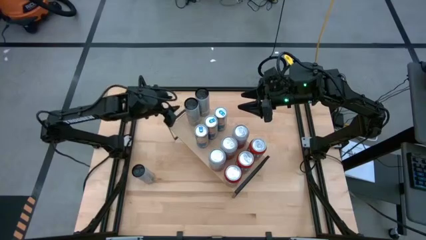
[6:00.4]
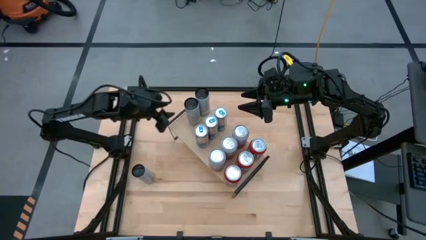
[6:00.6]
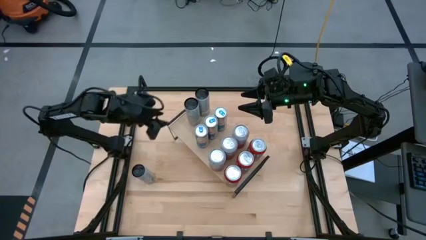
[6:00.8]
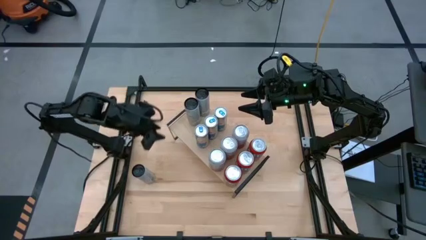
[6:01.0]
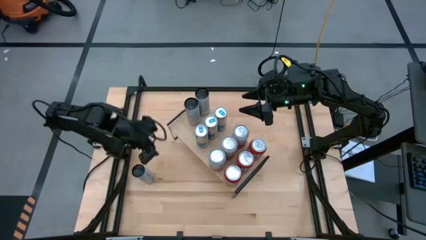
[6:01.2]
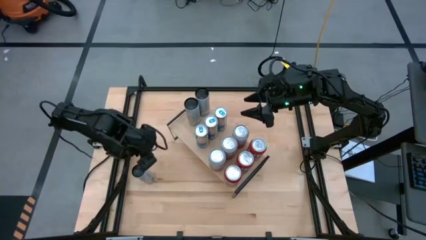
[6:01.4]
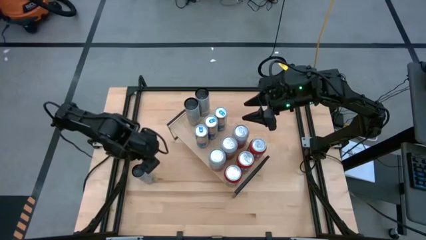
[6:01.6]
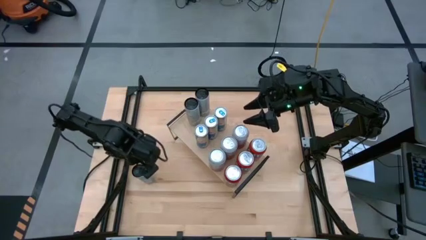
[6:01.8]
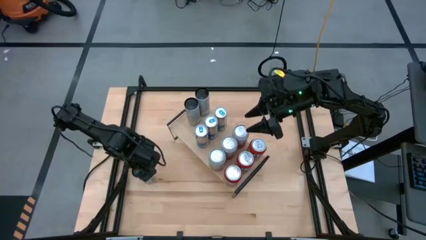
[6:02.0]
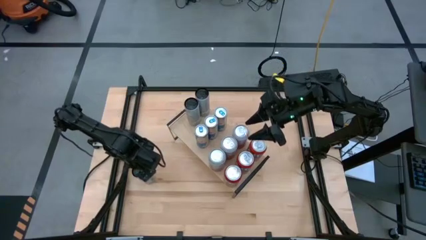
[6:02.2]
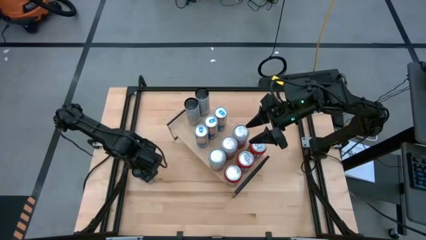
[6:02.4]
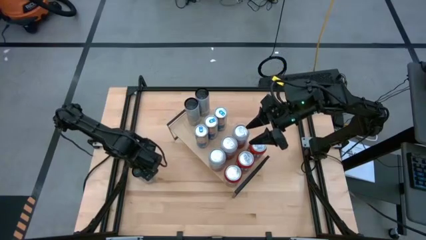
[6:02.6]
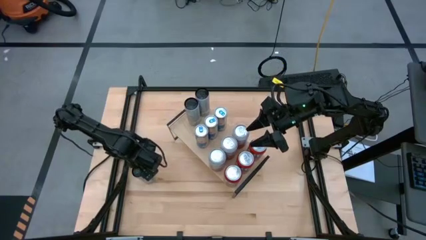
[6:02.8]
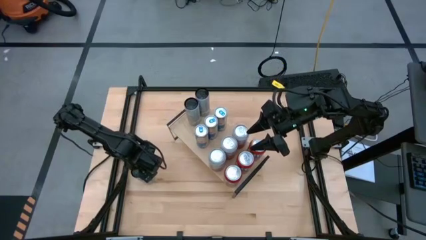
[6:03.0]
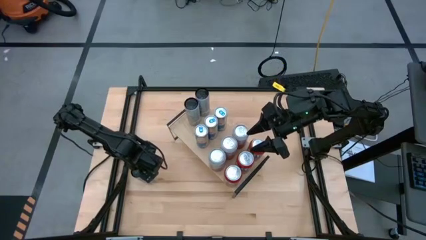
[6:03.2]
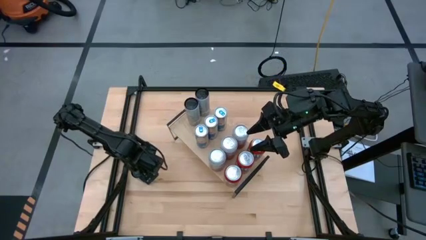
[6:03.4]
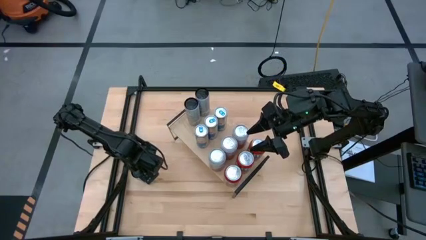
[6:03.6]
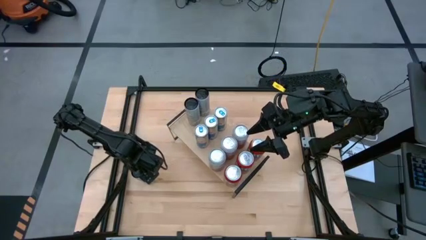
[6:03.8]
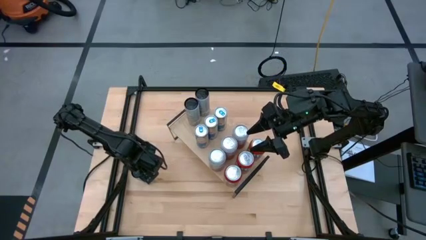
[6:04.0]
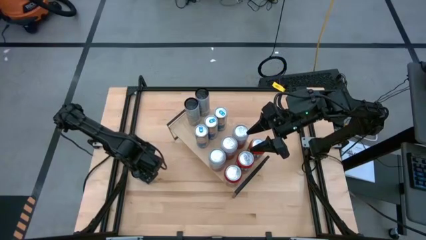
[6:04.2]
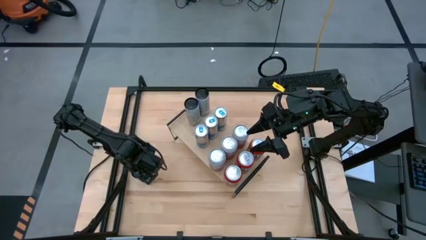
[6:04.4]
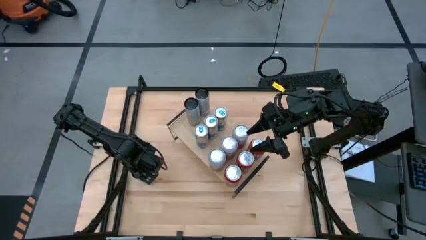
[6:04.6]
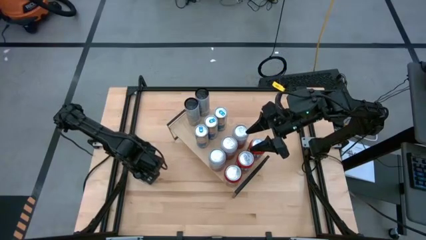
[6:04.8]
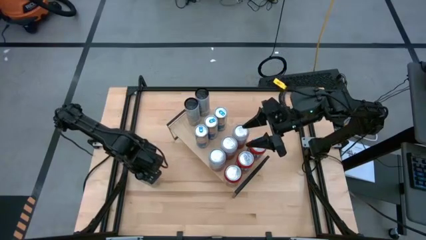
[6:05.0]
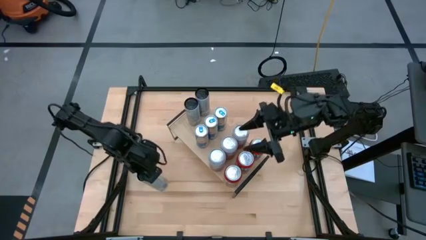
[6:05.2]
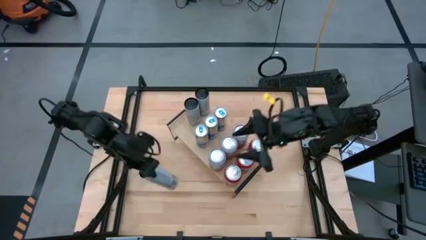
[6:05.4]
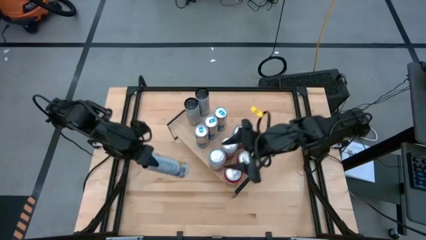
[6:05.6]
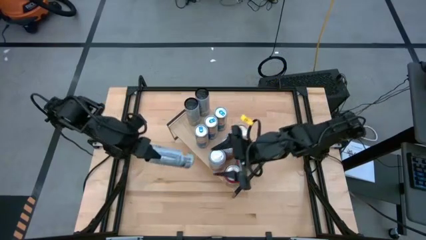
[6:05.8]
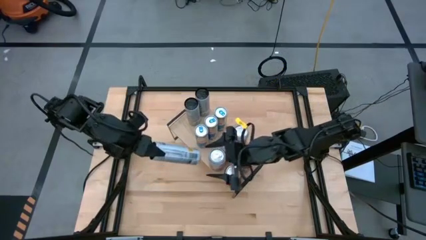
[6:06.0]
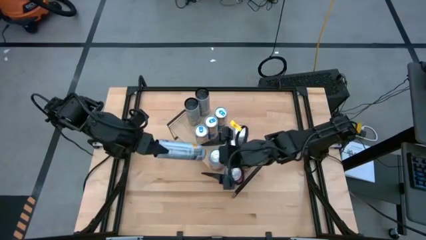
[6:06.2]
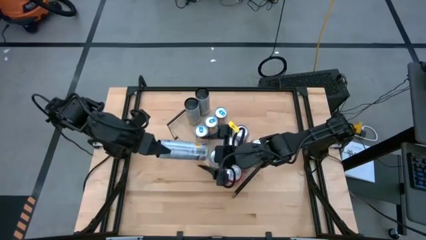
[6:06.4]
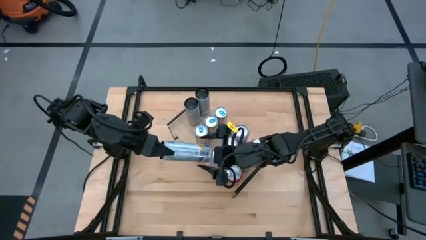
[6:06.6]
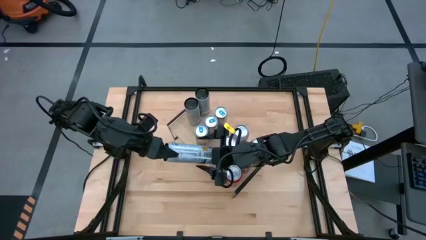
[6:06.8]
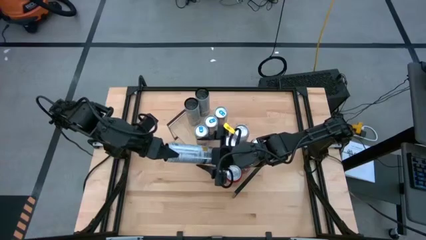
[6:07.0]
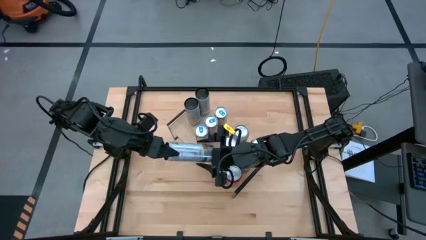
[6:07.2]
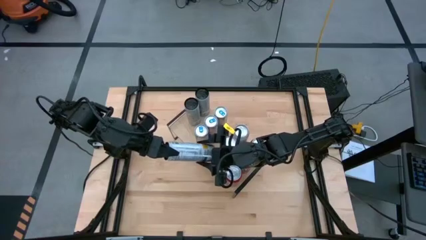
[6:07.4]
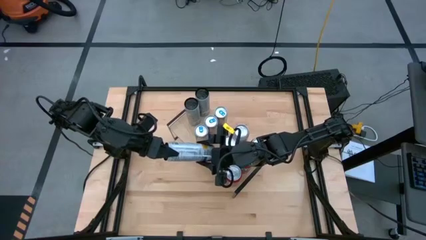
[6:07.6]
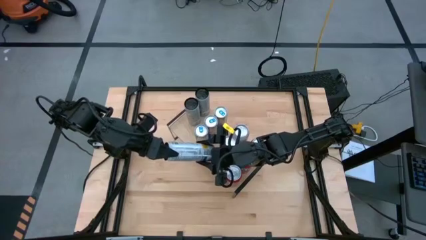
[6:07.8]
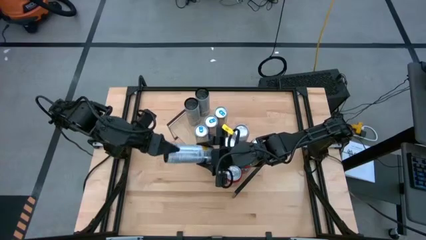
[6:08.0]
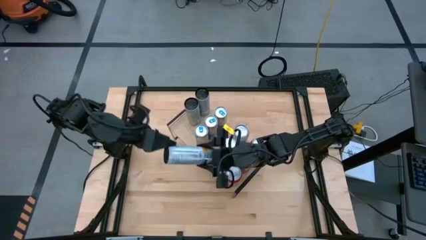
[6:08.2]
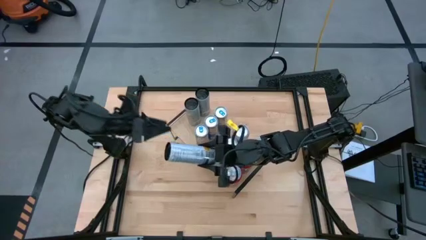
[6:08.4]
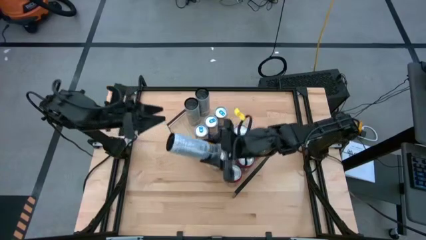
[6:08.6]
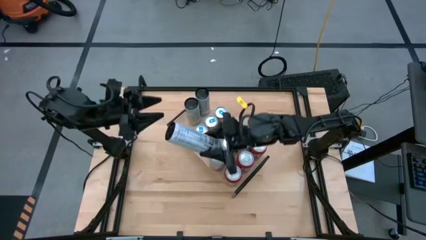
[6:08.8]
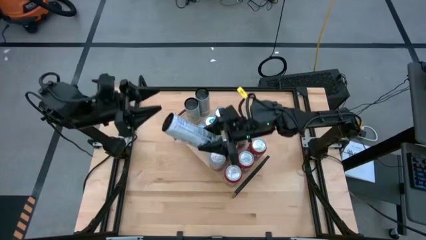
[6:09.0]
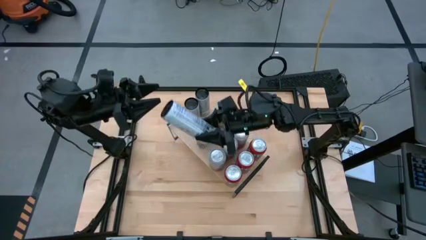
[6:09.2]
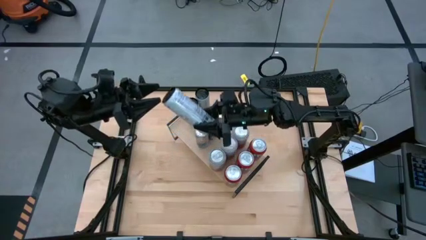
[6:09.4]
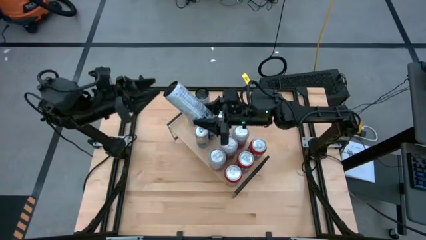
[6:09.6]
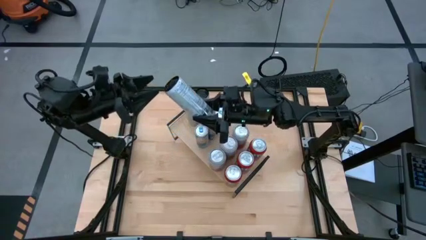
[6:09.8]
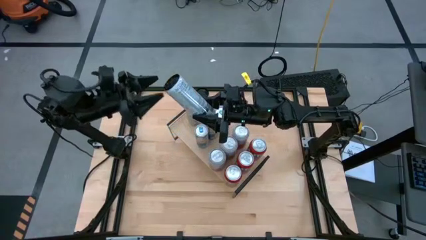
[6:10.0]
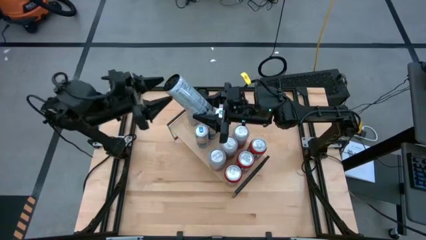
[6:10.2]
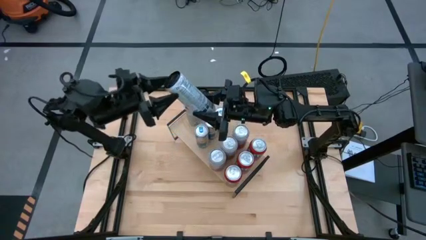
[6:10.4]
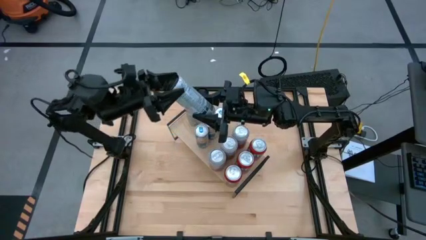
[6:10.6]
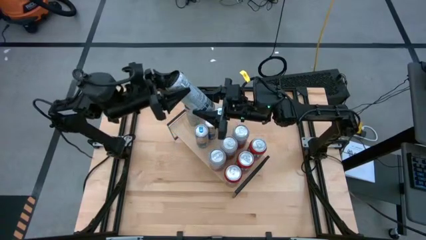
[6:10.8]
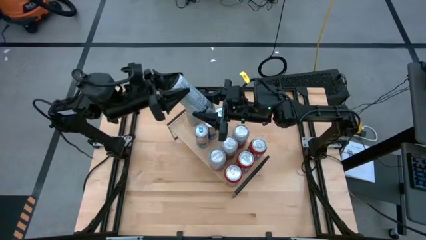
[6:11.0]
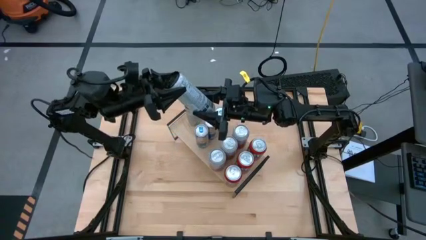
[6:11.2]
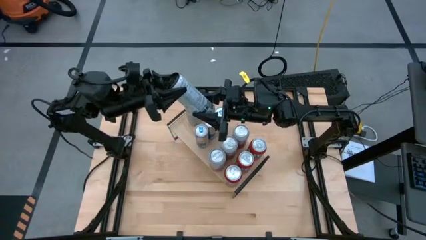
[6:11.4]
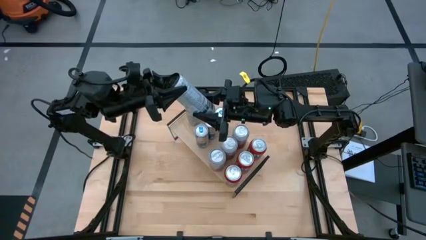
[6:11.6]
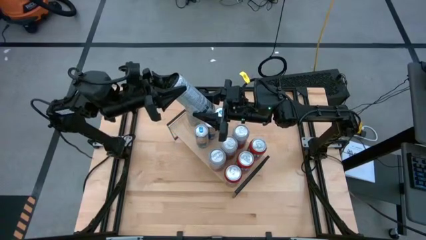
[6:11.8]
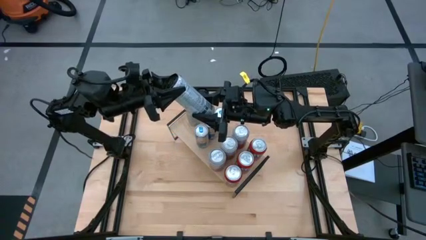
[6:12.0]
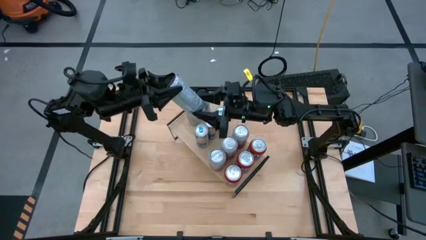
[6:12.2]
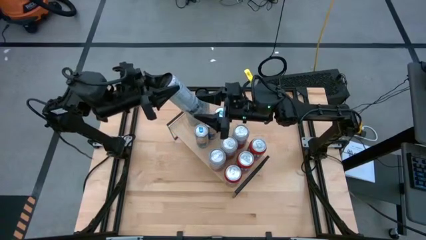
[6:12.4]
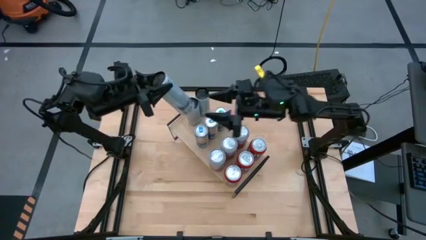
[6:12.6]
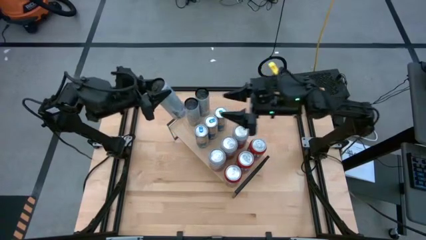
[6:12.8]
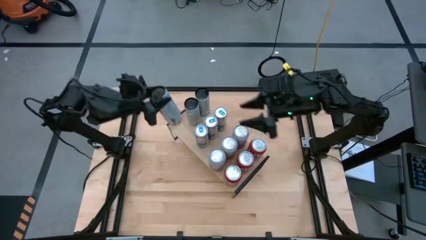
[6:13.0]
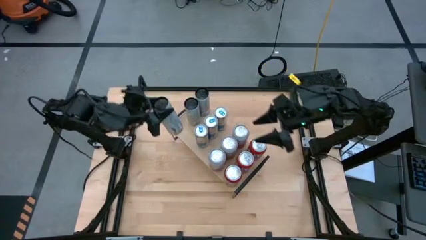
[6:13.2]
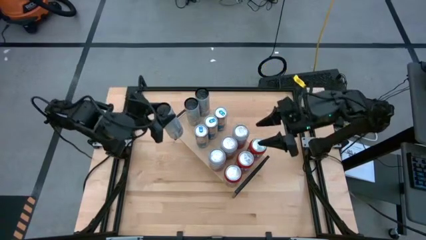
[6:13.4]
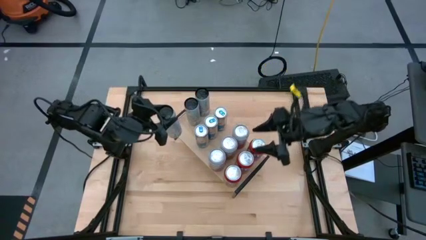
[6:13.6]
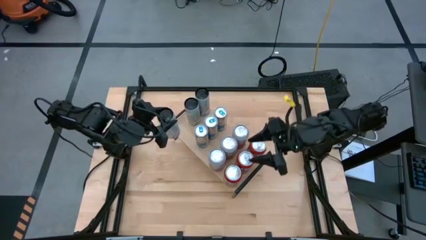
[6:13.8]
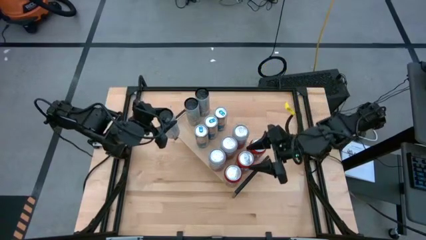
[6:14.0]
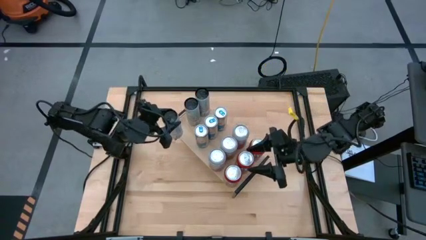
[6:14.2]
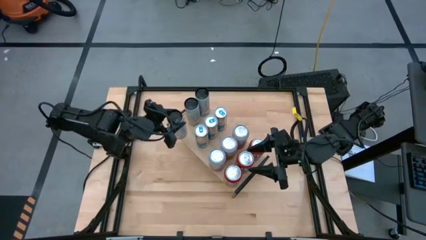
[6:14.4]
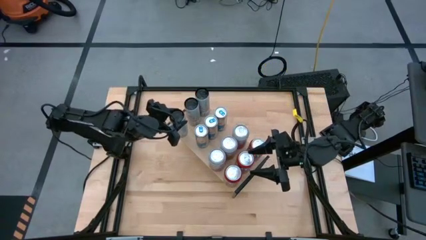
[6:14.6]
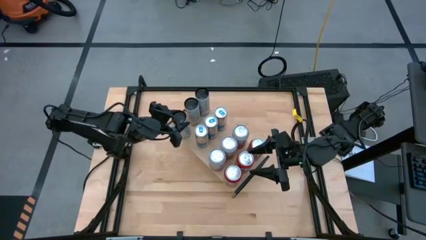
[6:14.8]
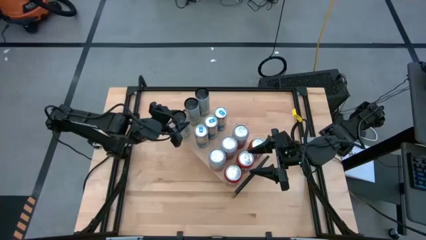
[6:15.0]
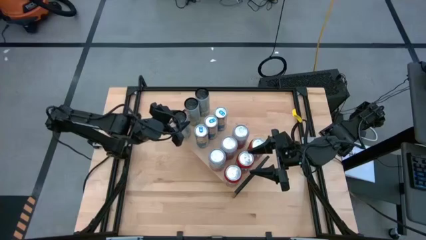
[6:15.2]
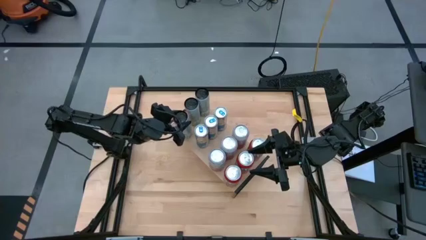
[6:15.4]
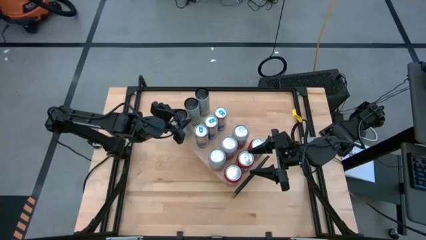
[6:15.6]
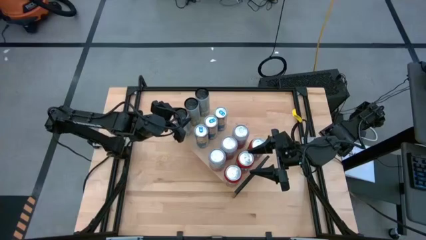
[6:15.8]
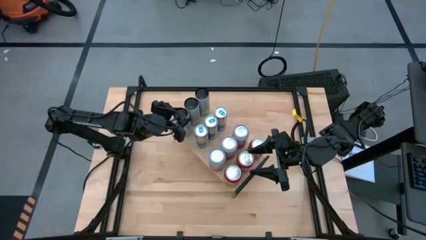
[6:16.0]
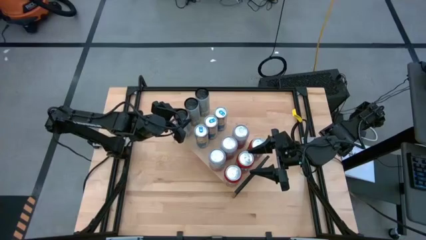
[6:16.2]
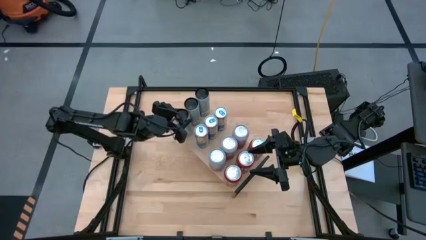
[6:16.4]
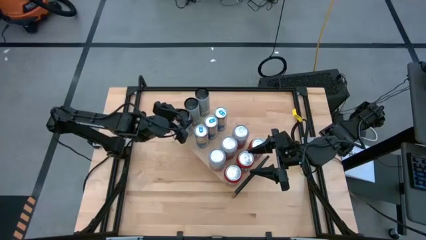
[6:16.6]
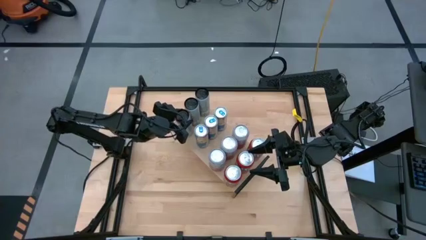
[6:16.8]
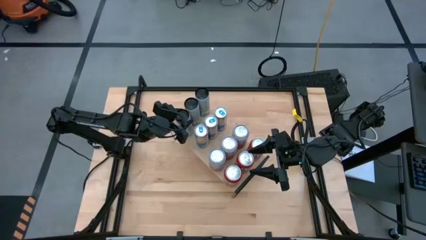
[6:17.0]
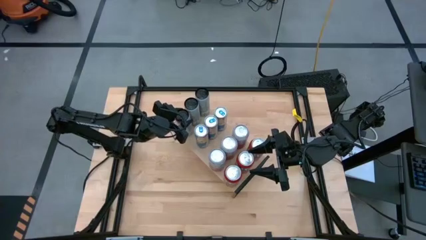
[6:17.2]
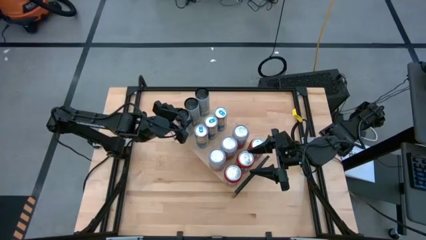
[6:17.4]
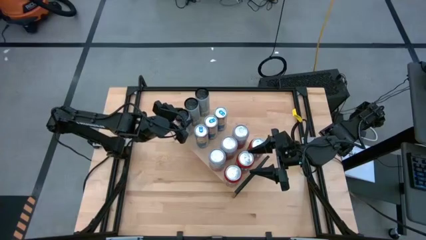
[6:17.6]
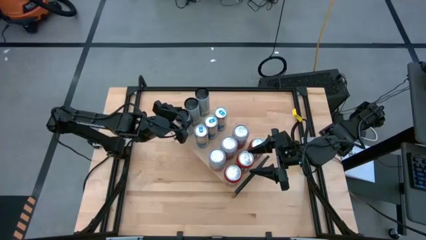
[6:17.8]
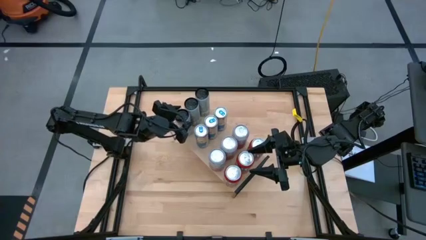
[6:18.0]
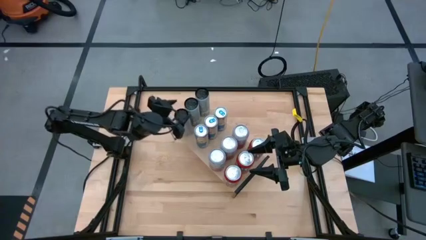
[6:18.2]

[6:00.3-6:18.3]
Task: Place canned beverage on shelf
Put the white yellow soda can on the shelf aligned with the other white yellow soda can
